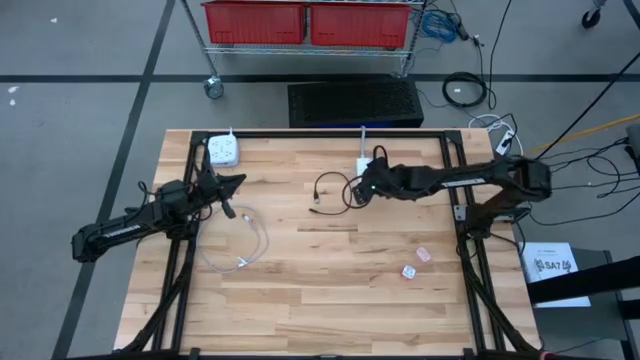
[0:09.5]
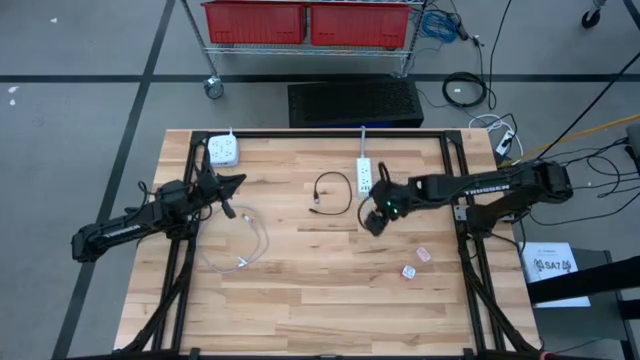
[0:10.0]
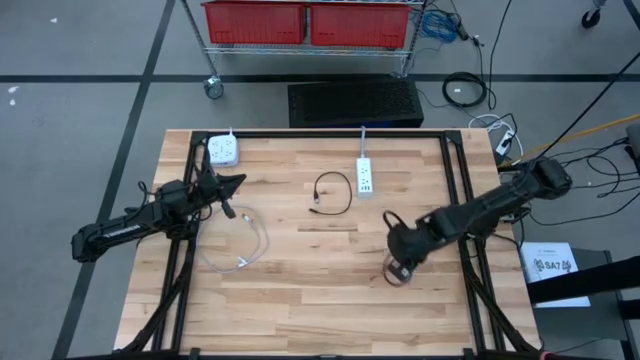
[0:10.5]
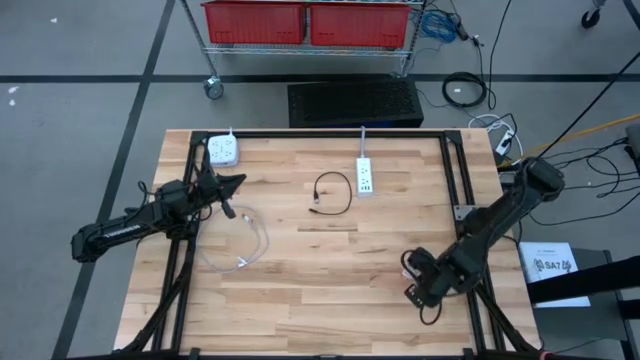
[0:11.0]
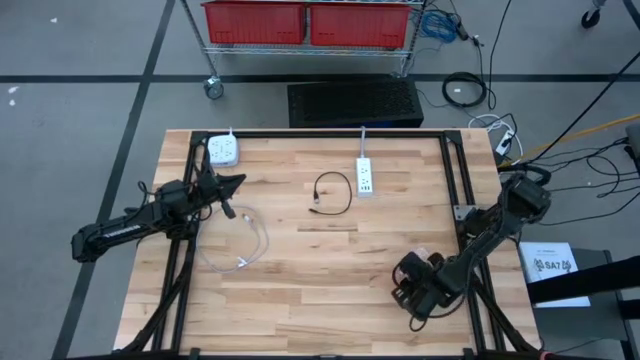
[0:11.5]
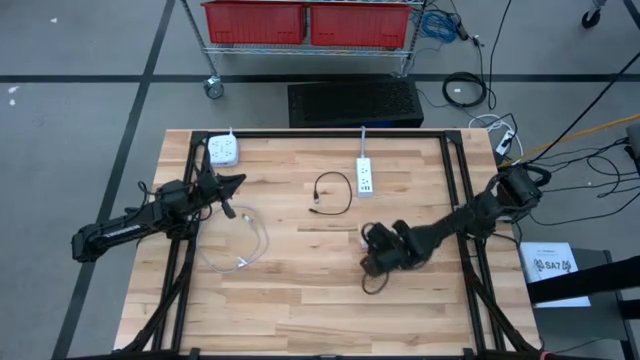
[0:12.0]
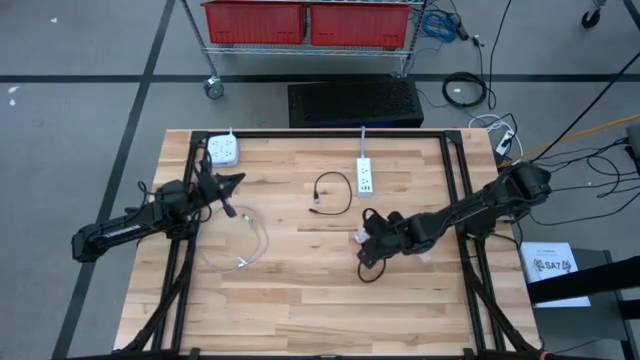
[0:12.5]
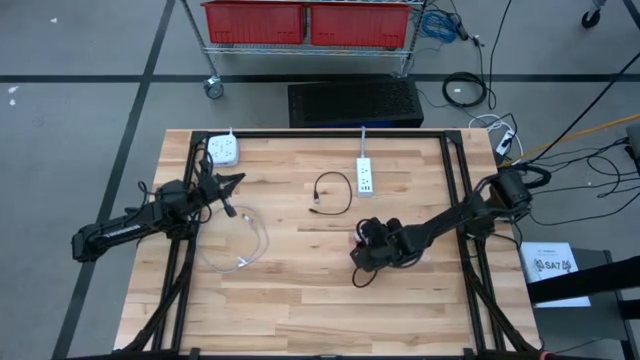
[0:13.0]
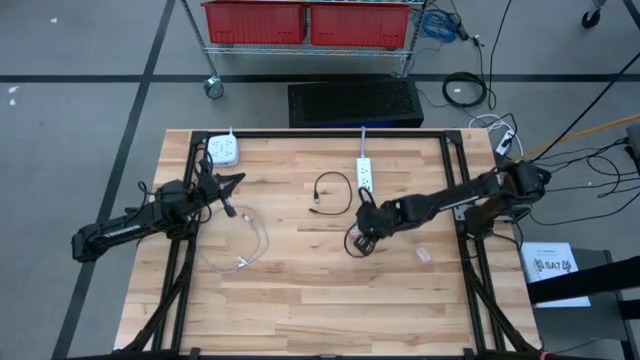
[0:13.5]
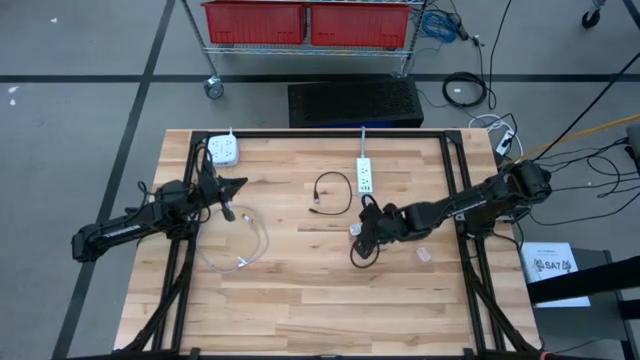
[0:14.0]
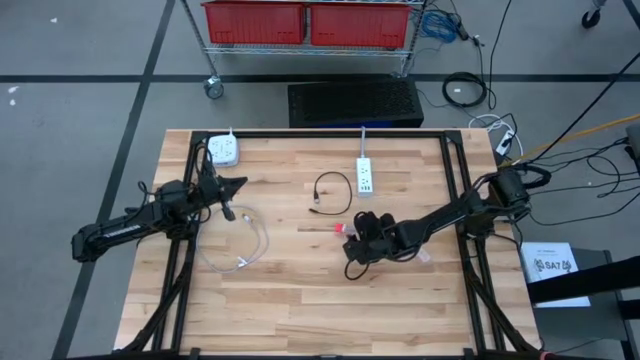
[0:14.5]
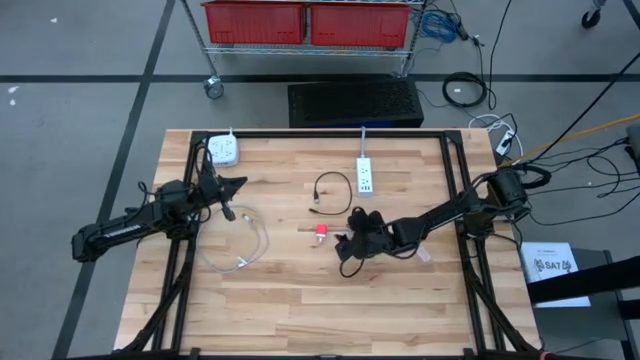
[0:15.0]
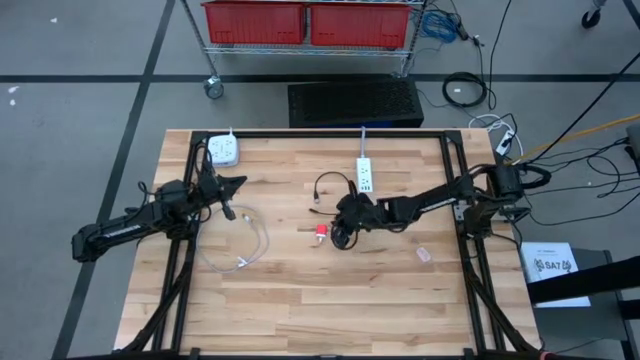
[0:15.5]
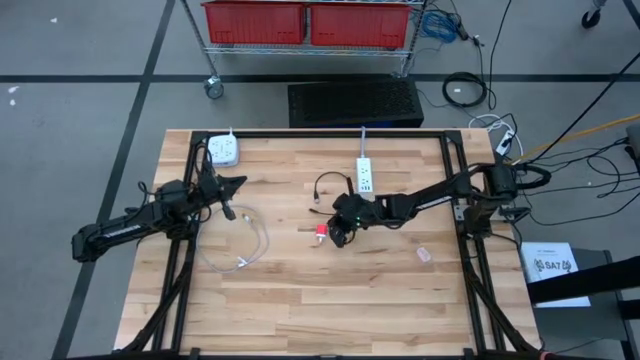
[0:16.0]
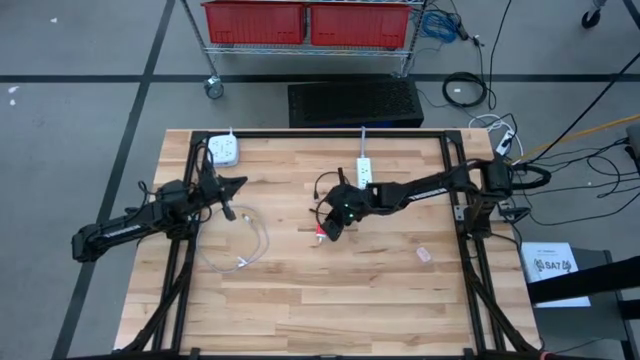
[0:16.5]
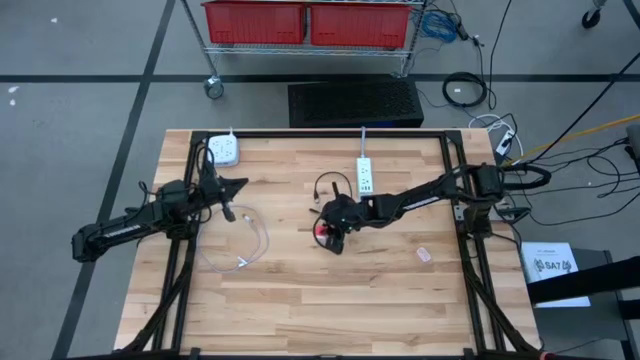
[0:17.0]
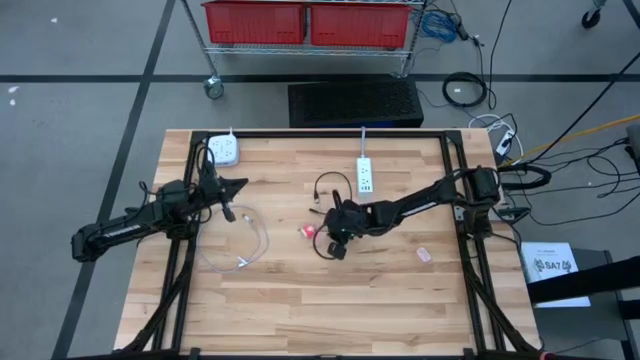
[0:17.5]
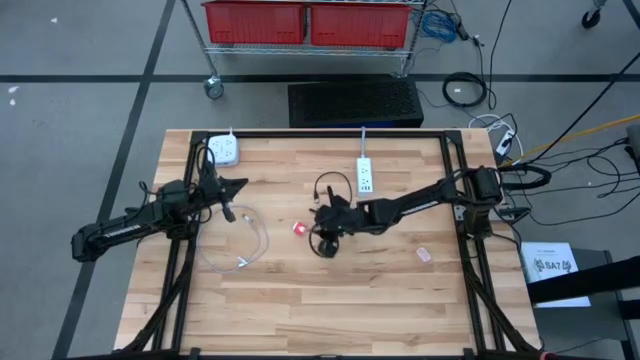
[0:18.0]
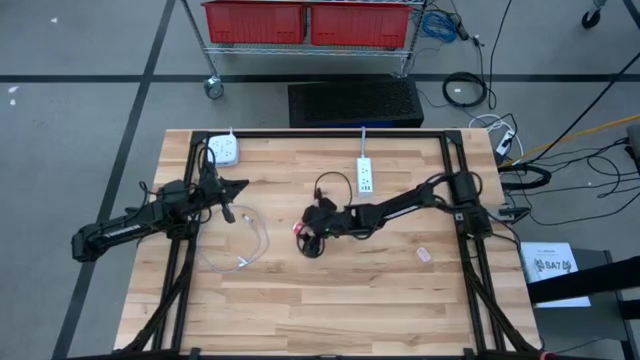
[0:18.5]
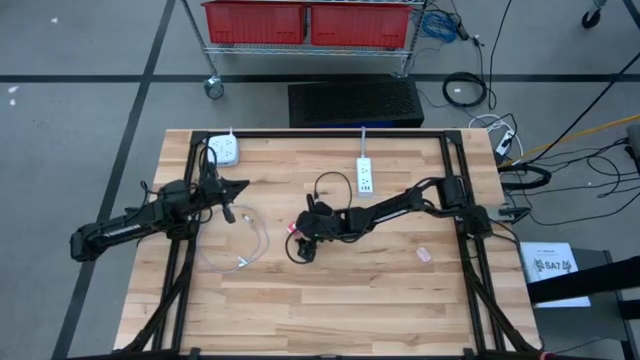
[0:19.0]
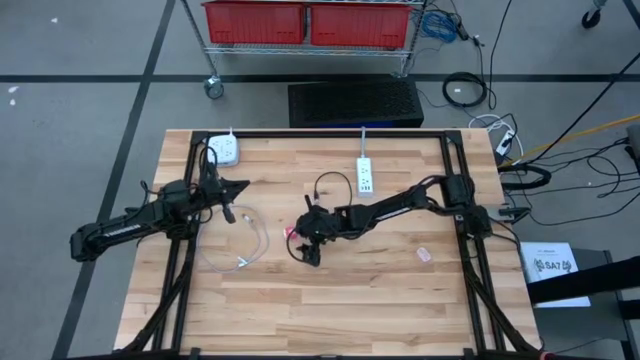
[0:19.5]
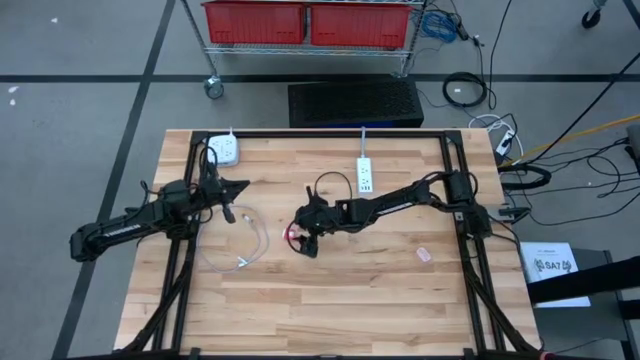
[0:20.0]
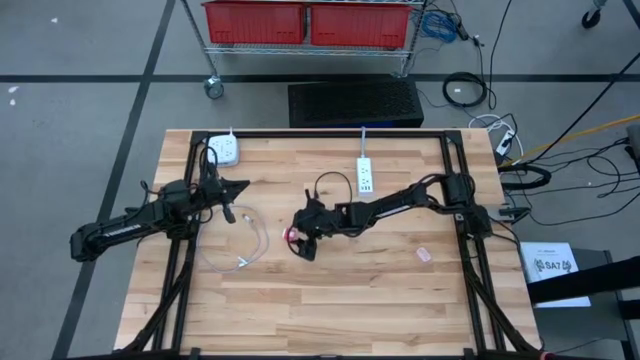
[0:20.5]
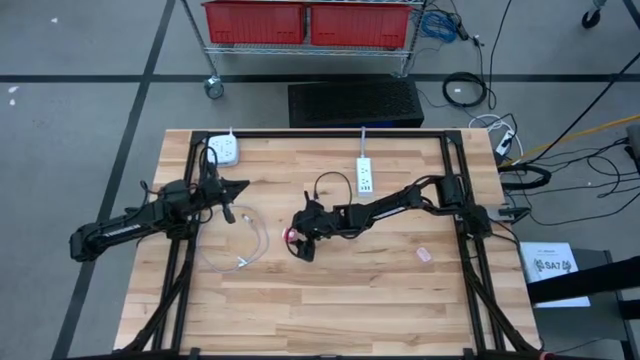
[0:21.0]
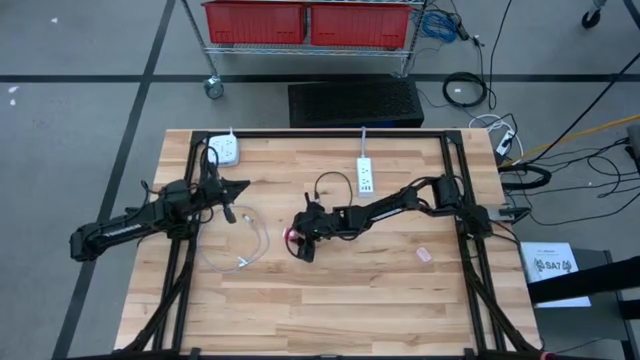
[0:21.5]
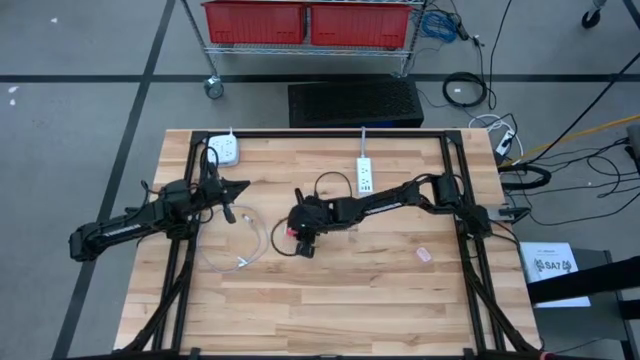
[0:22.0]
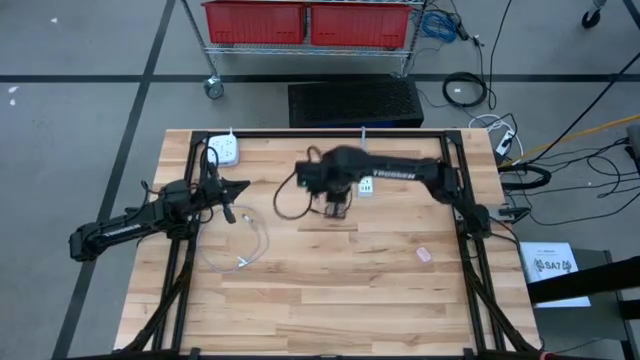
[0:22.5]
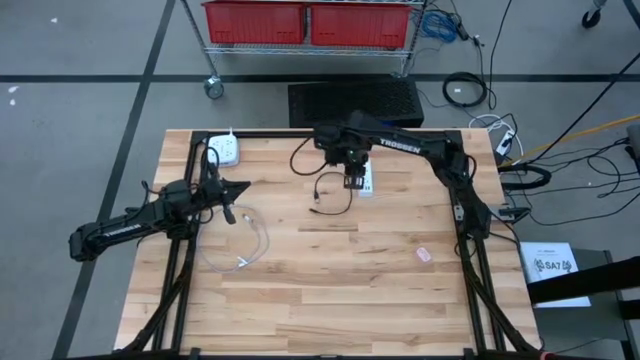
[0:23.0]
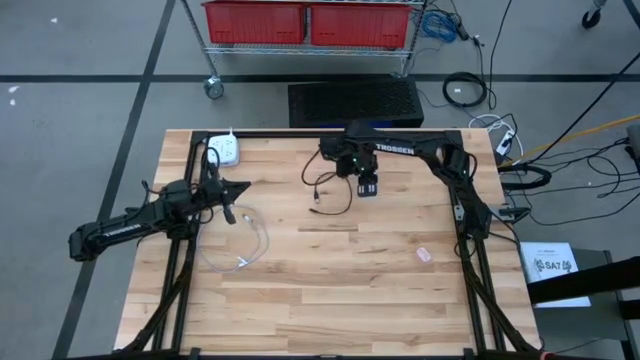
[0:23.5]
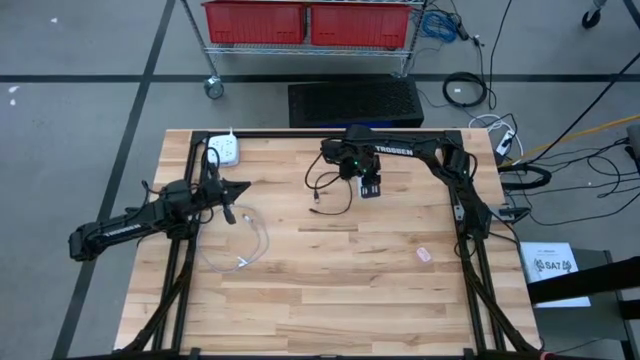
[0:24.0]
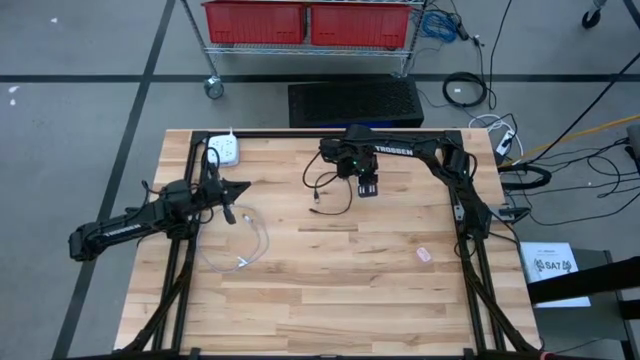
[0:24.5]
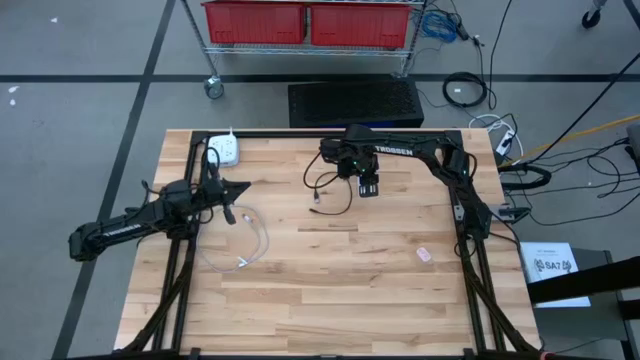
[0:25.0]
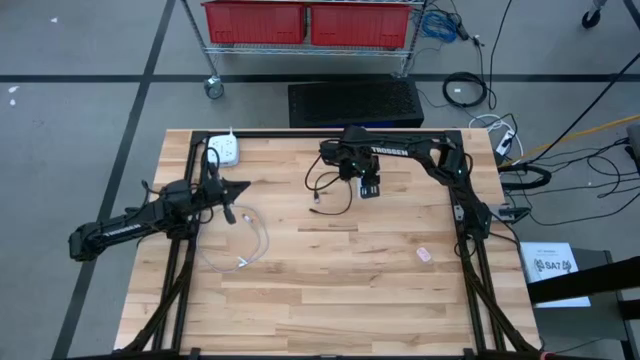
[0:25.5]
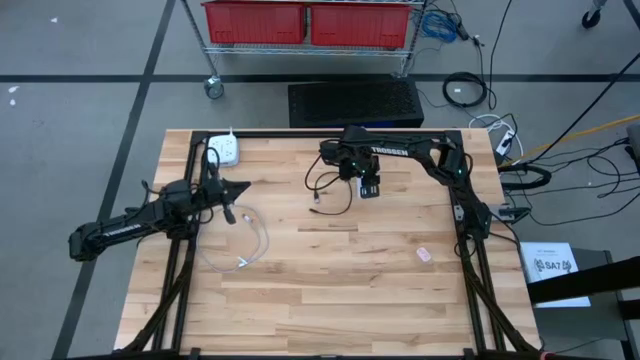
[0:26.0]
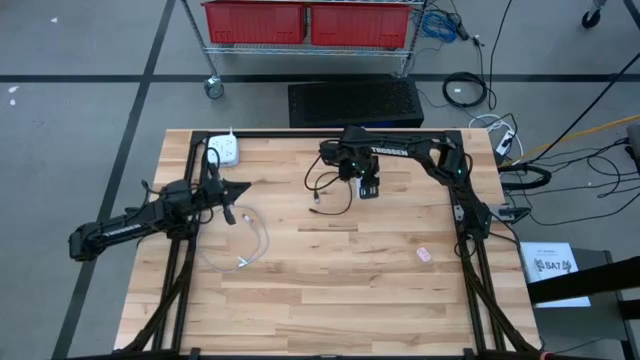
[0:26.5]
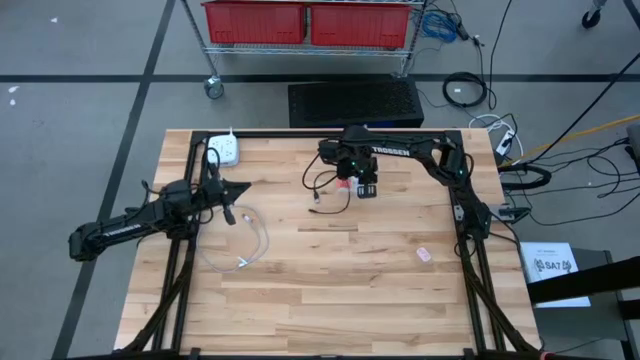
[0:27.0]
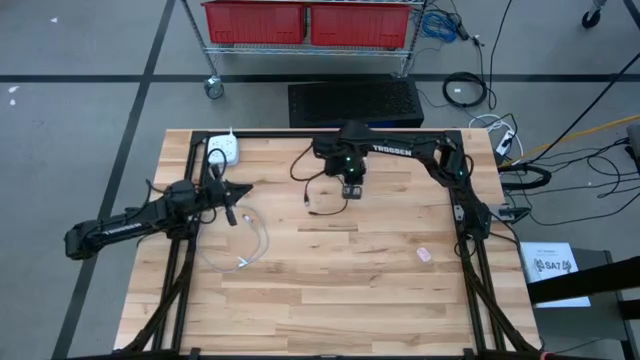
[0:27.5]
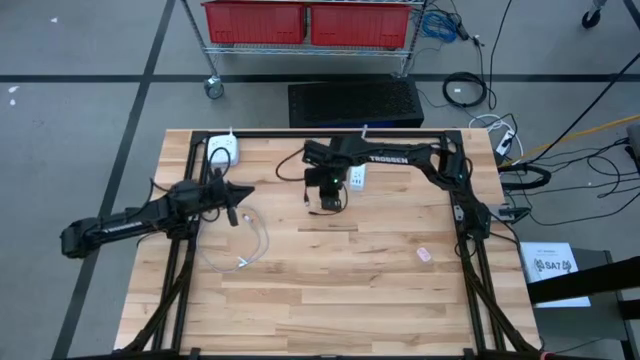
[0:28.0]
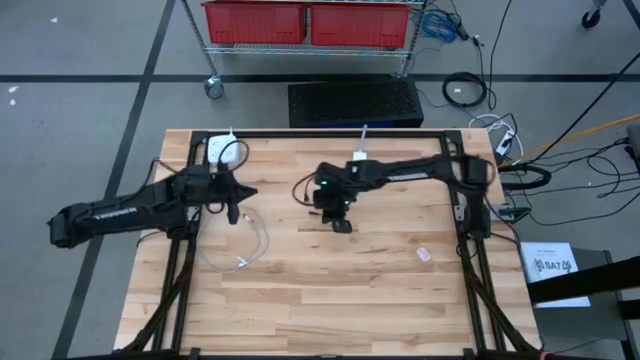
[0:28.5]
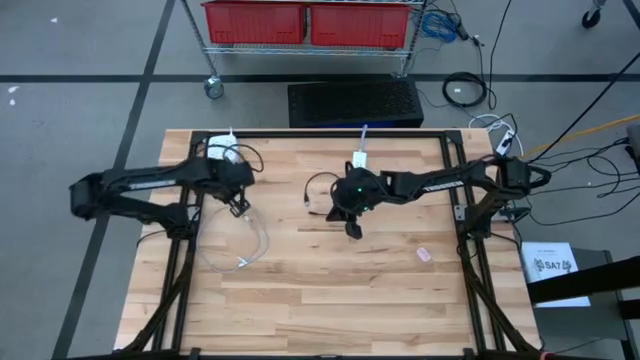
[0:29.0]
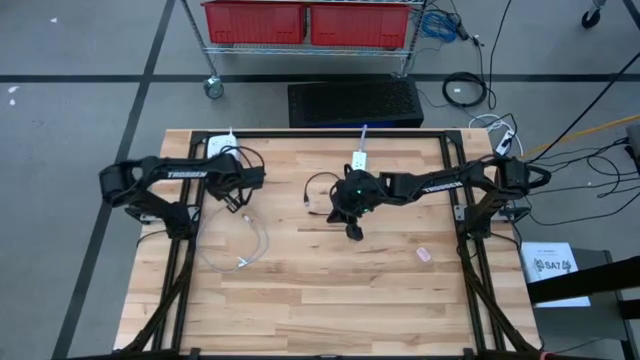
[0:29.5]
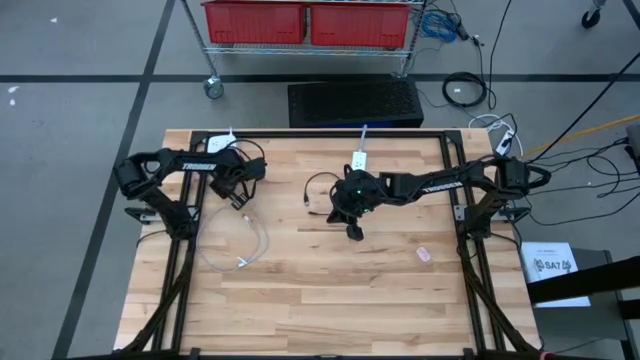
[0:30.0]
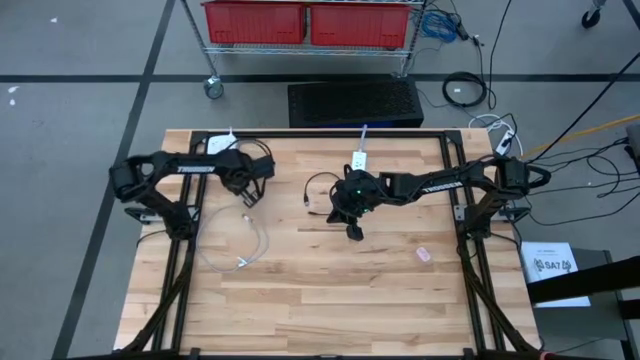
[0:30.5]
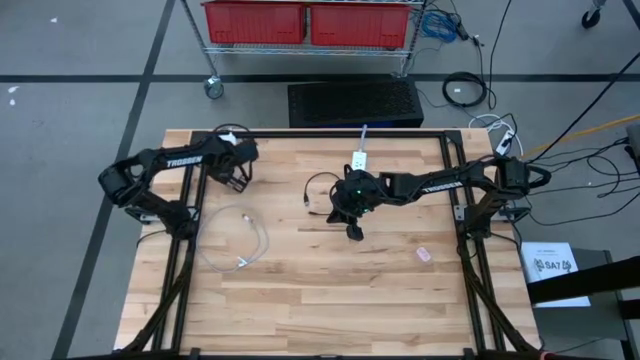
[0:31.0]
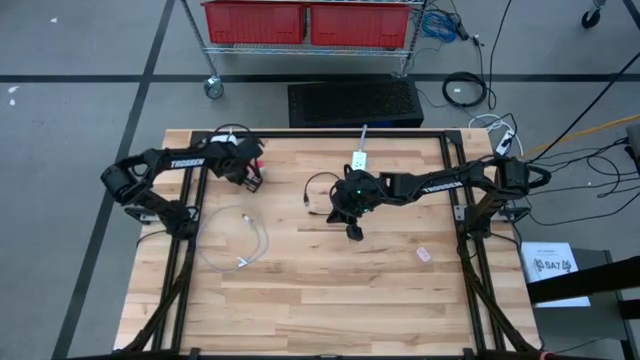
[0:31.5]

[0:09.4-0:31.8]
Task: Insert USB
Insert the red charger adapter into the right outlet extension
